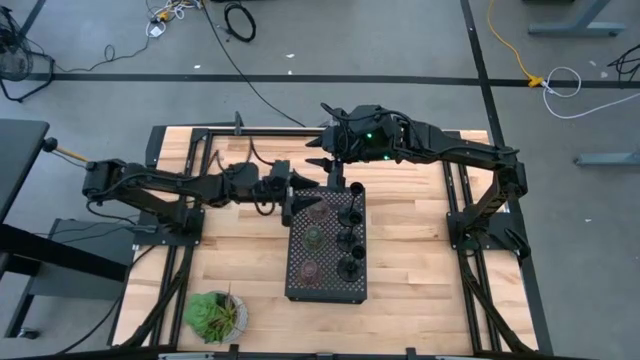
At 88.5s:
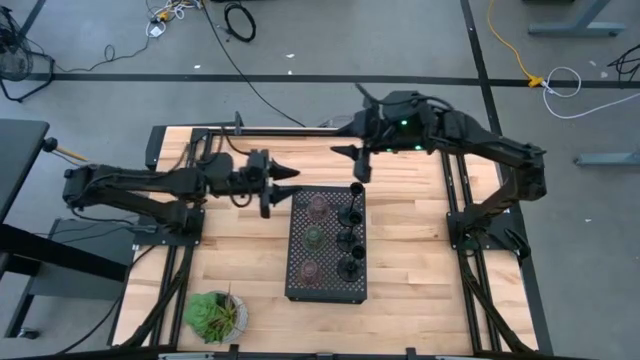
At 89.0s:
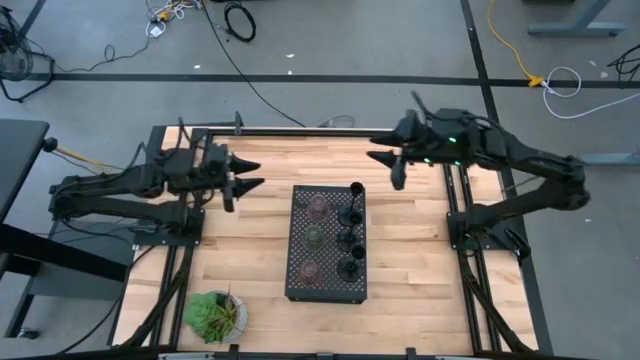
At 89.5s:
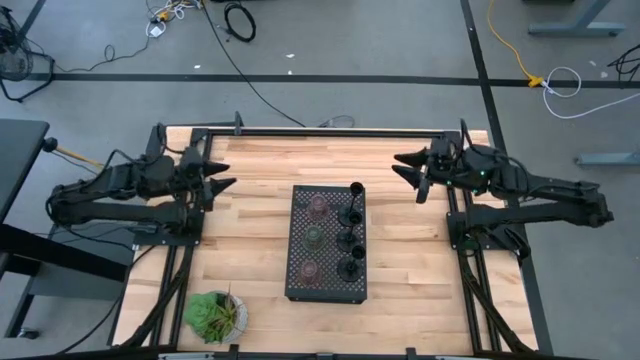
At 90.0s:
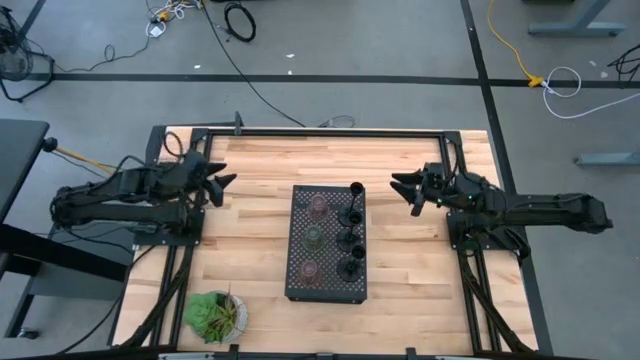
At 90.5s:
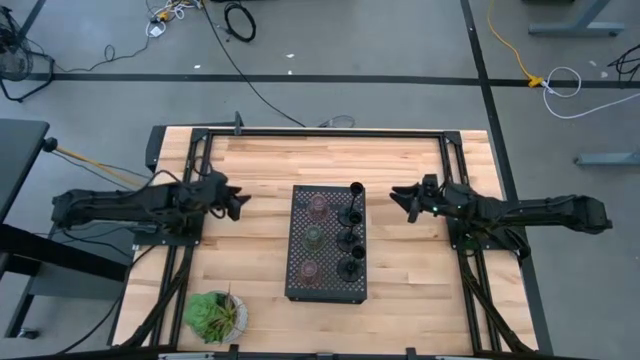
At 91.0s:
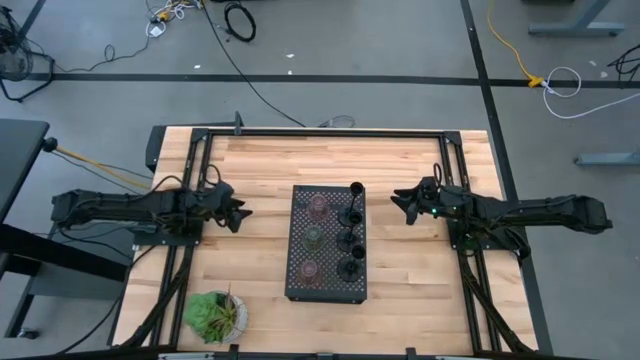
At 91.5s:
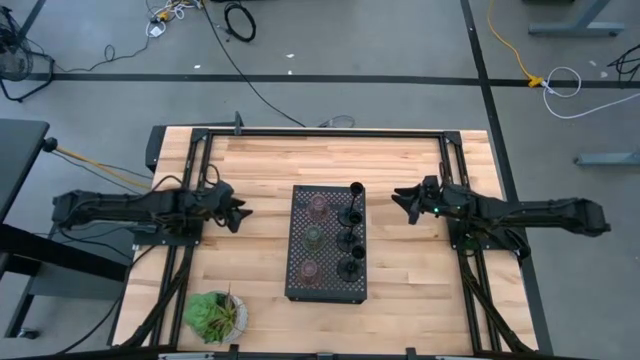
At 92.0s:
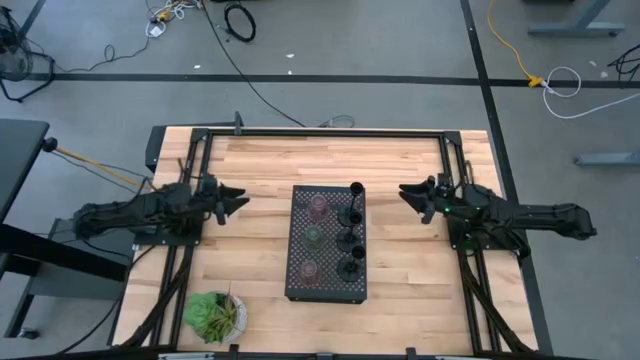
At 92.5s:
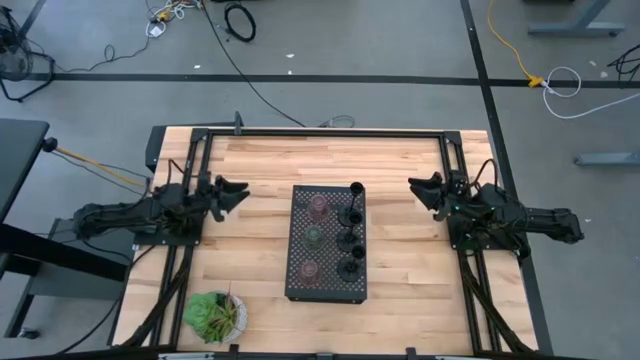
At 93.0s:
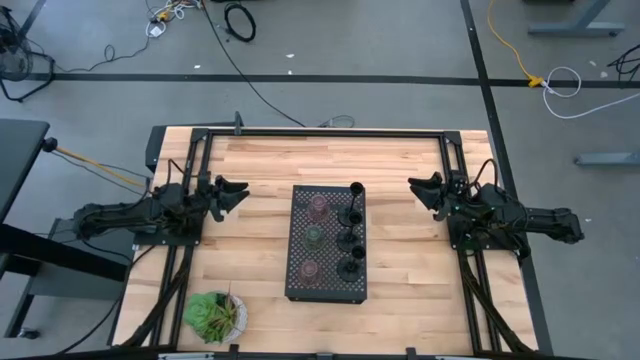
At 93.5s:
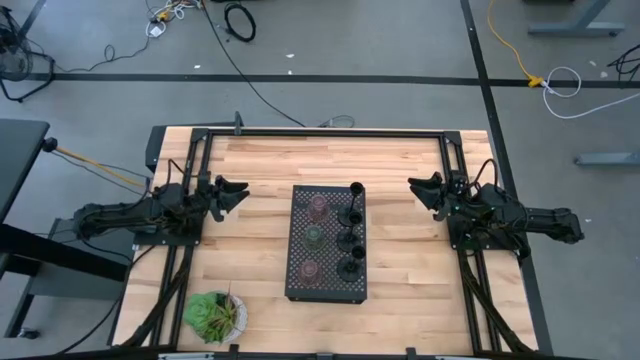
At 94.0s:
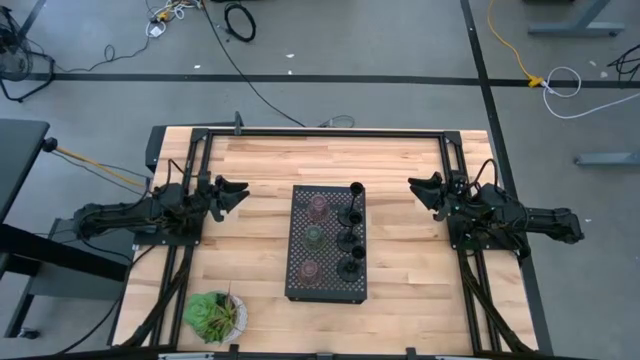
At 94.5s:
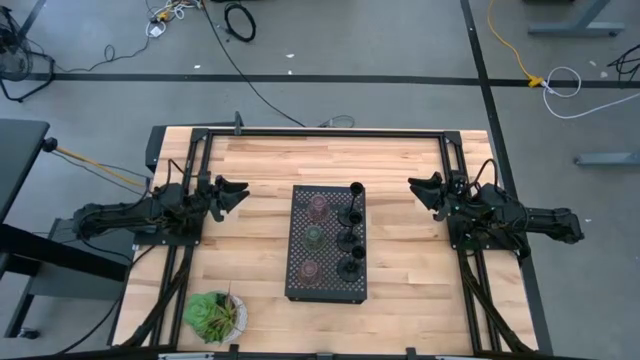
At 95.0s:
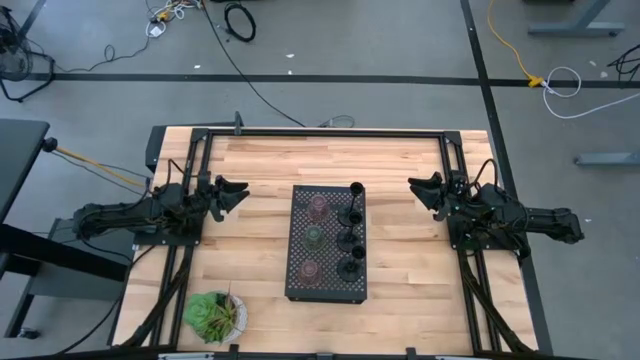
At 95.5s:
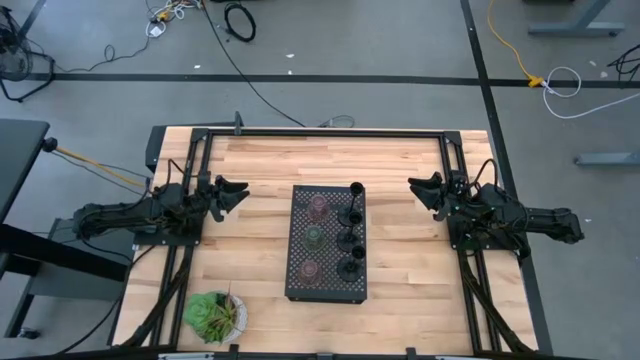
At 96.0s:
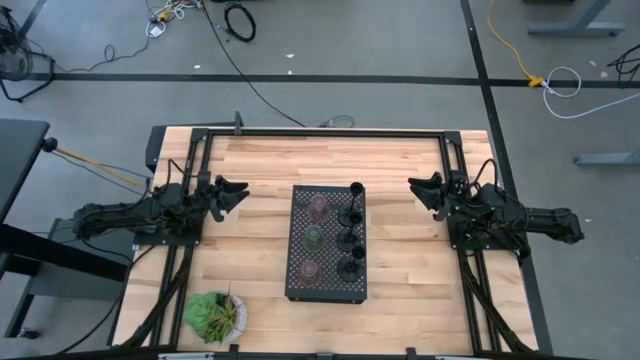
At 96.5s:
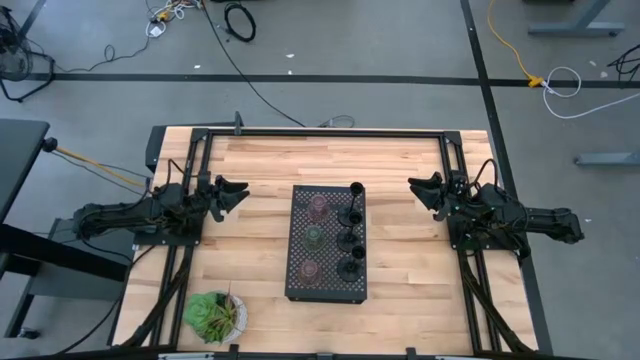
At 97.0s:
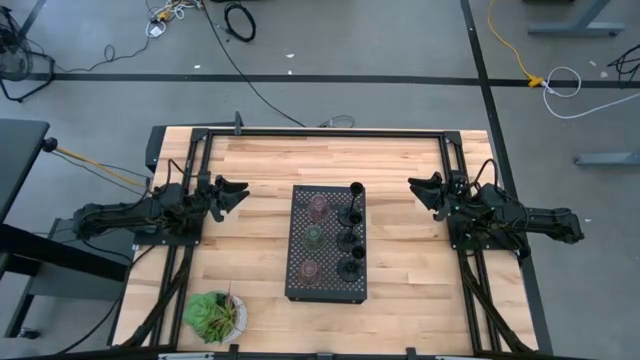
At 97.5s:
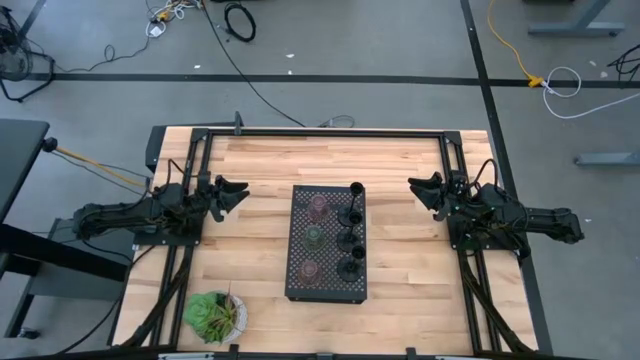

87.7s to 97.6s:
Task: Pick & Place candle stick holders
Return to Home Position

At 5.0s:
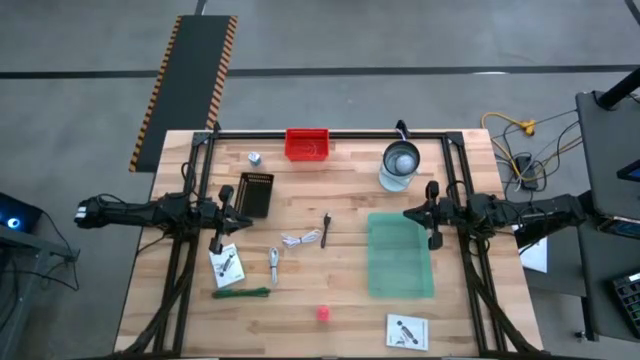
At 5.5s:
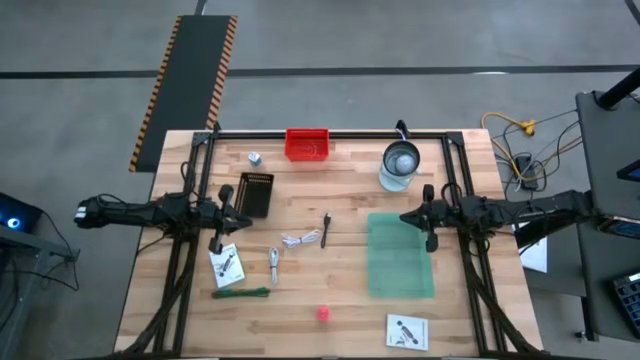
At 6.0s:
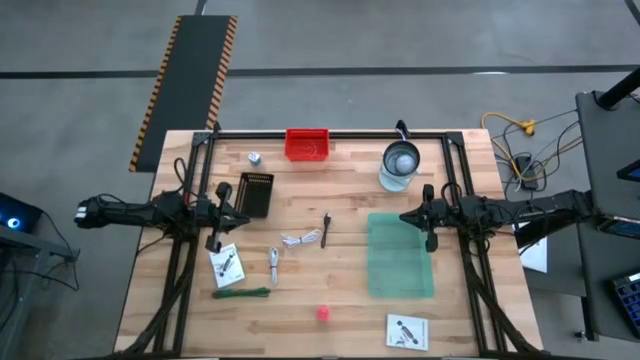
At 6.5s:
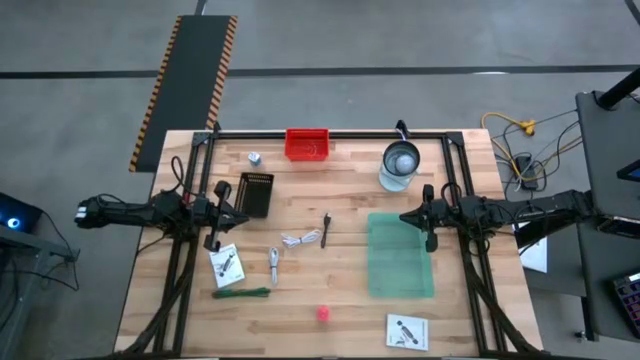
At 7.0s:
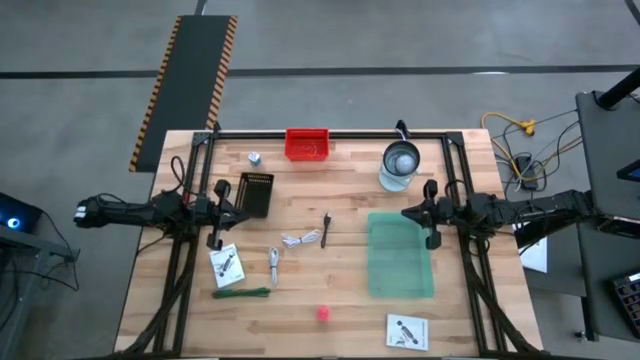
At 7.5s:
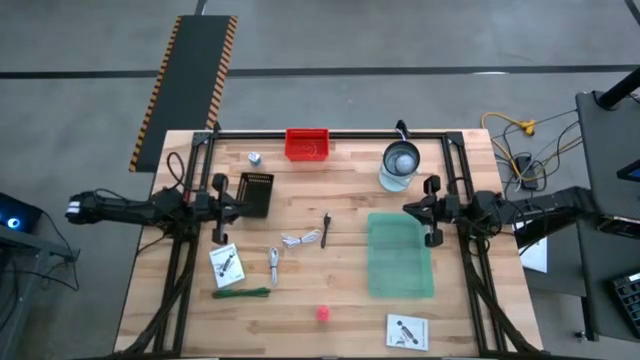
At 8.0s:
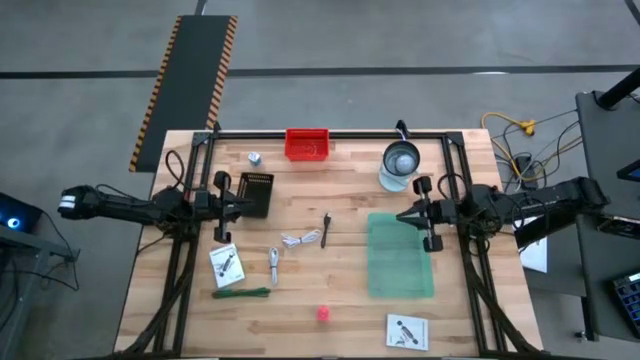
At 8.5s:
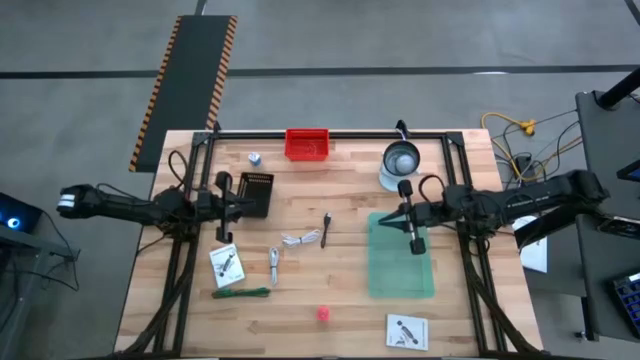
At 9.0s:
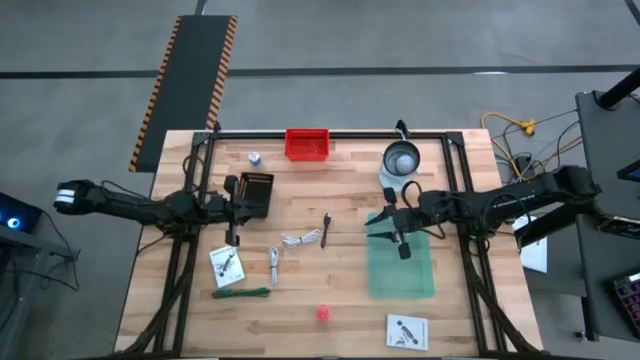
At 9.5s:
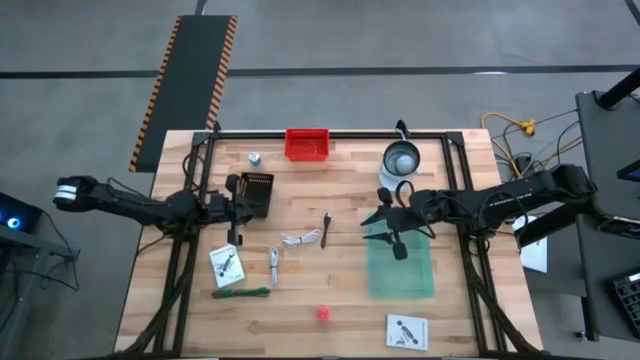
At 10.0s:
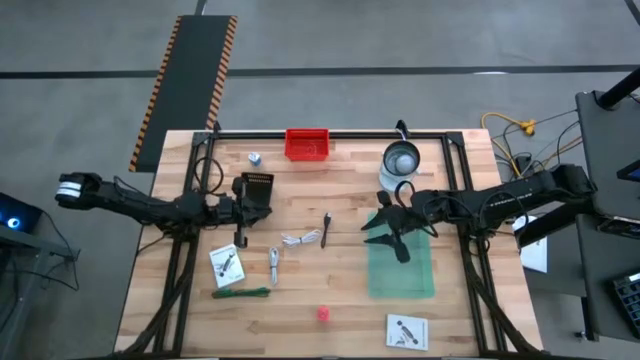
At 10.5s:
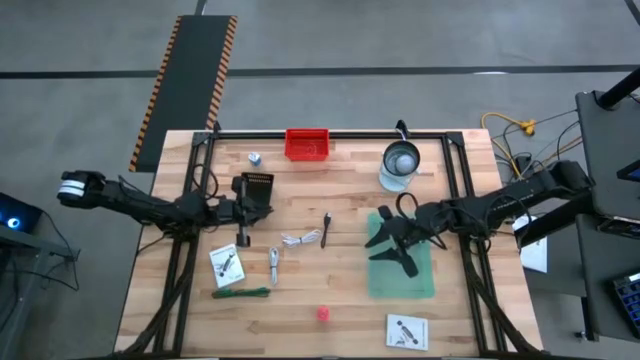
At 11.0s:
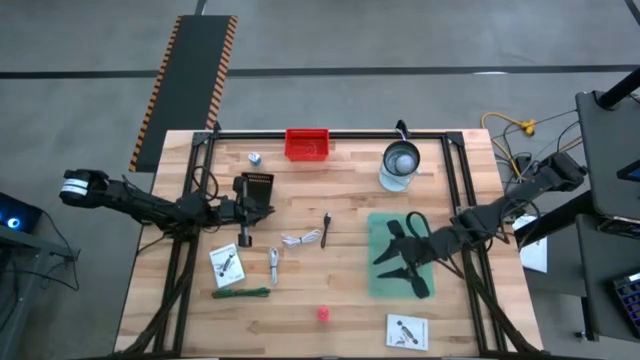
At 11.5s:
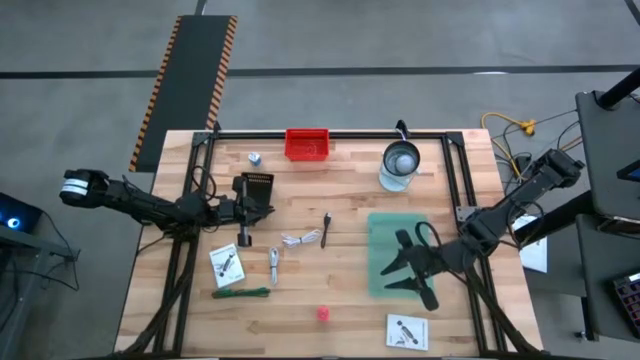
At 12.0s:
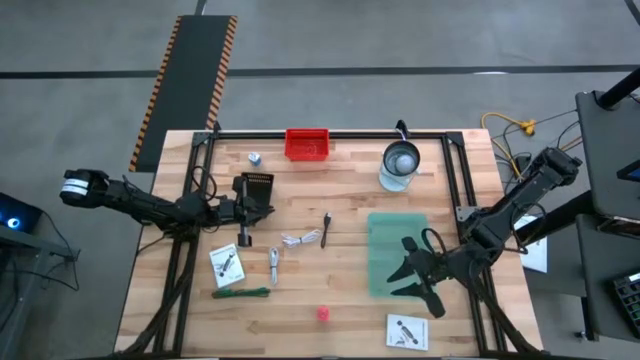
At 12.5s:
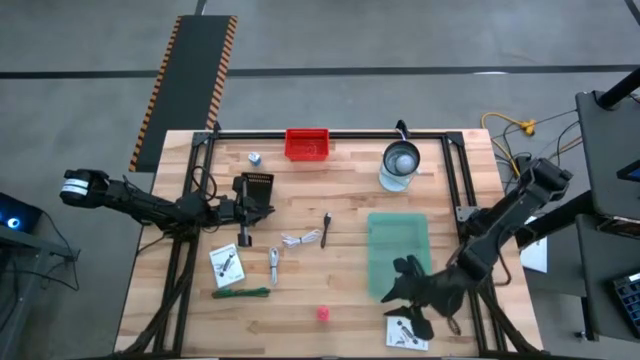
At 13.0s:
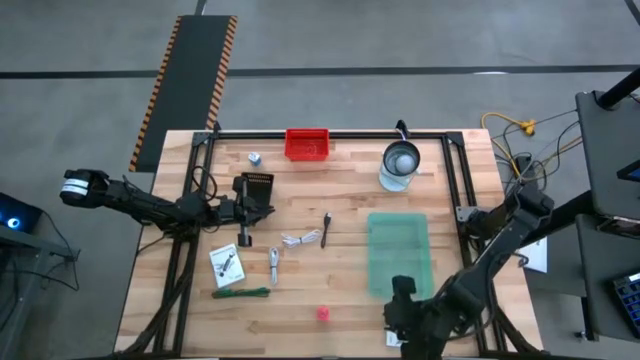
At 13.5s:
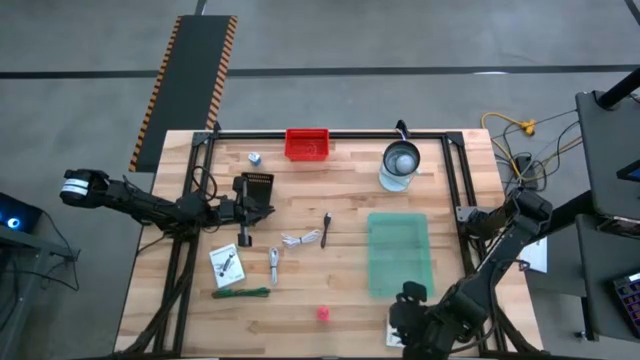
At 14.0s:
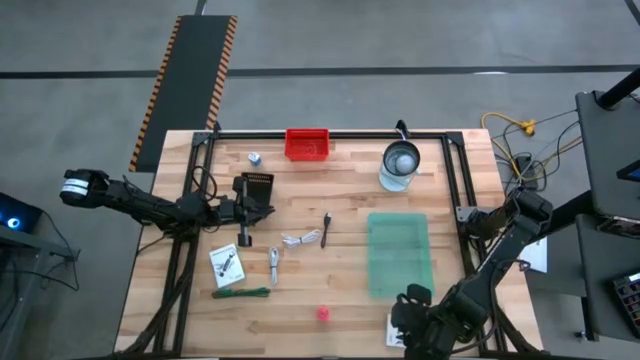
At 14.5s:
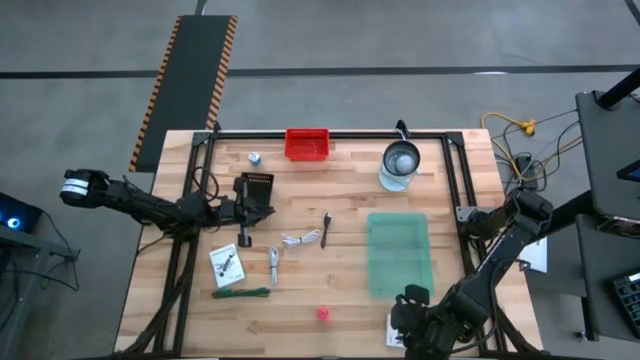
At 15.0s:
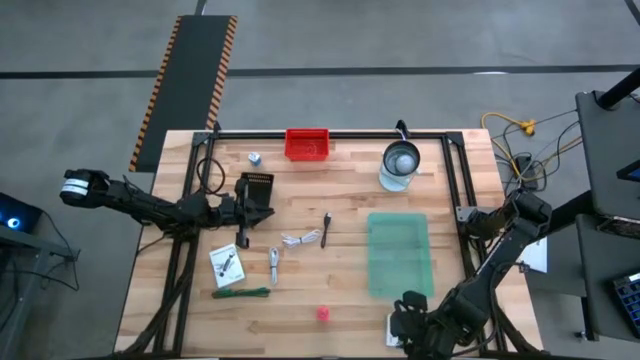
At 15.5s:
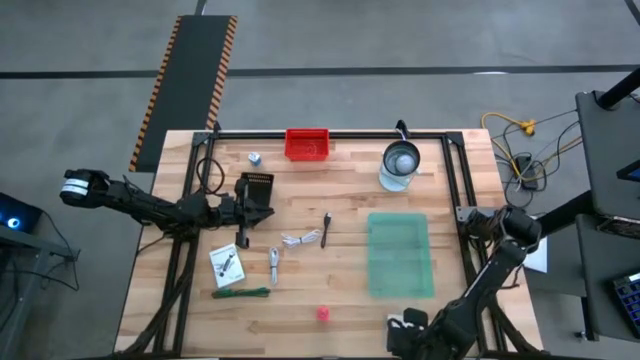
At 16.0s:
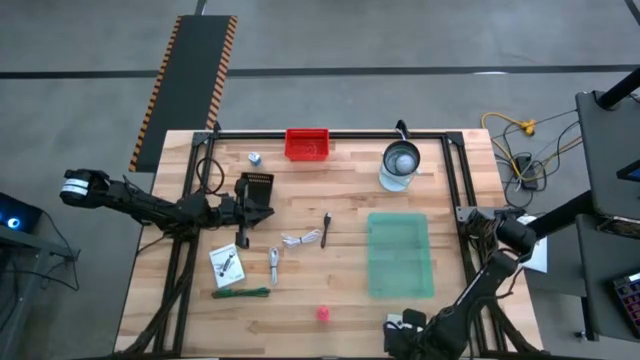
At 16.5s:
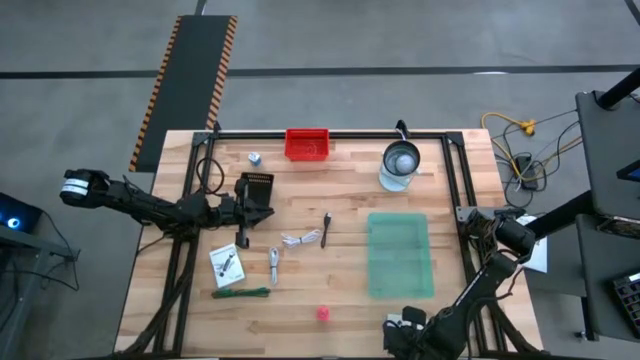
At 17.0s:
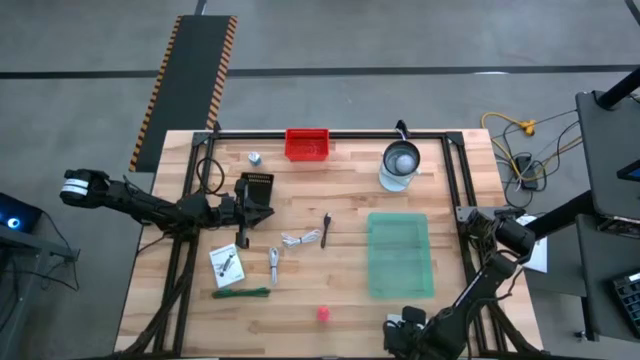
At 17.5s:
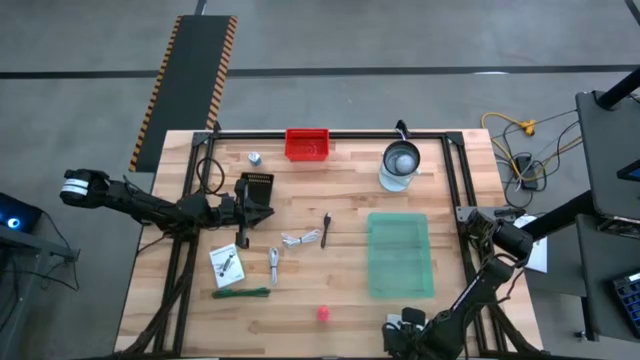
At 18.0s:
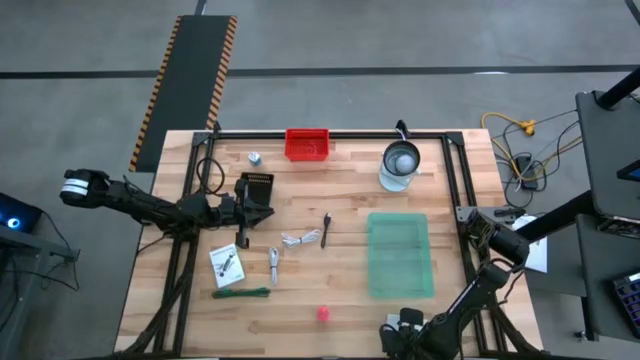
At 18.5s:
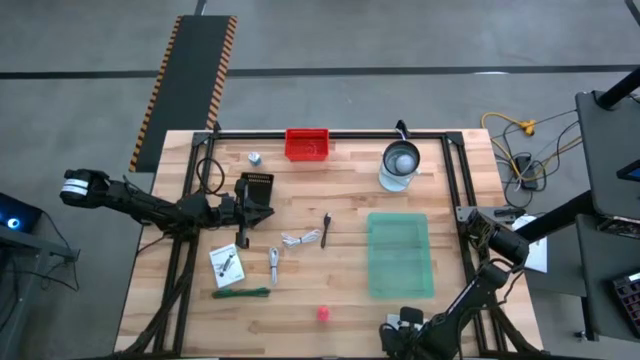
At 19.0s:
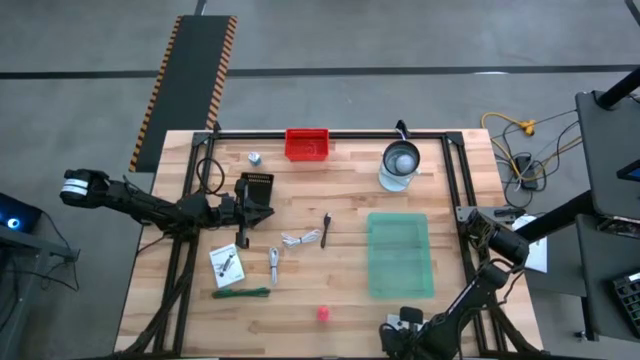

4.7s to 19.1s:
Task: Pick and place items into bin
Put the bottom card reader box into the red bin
